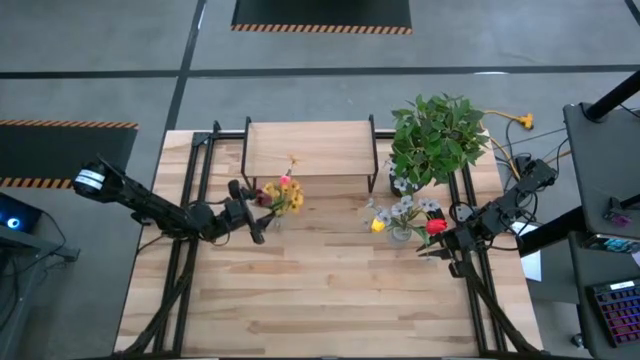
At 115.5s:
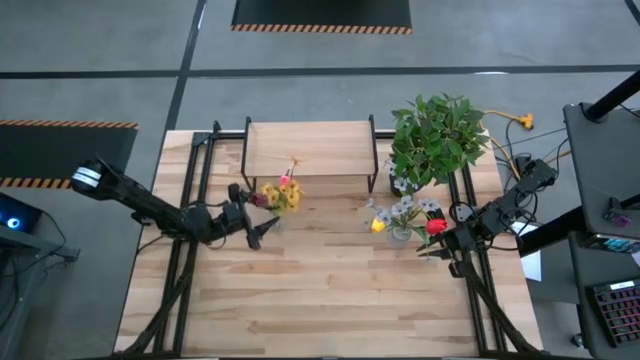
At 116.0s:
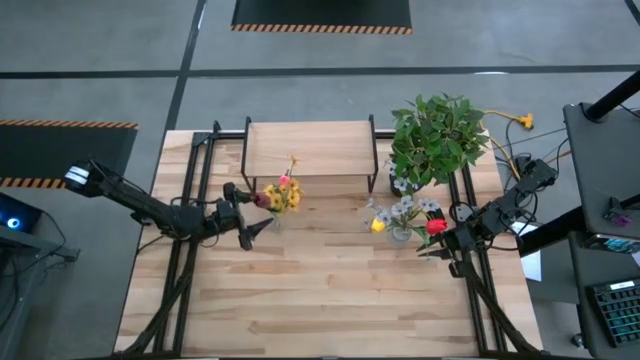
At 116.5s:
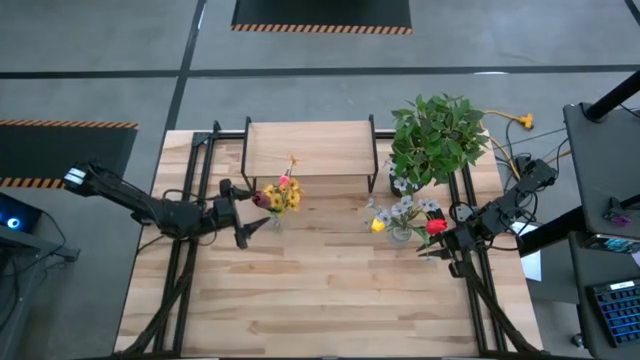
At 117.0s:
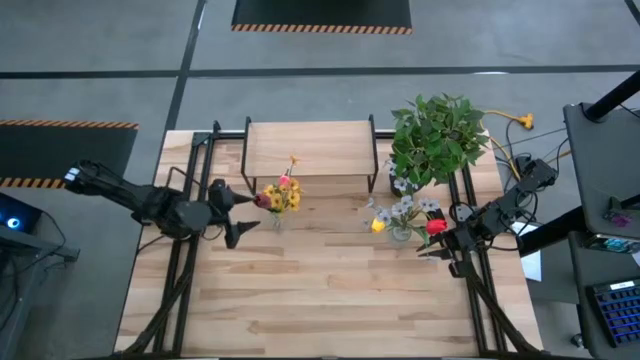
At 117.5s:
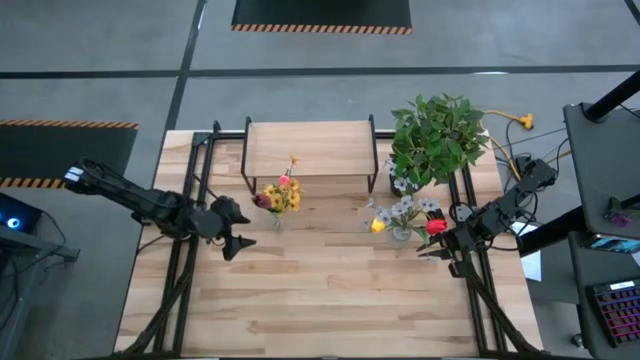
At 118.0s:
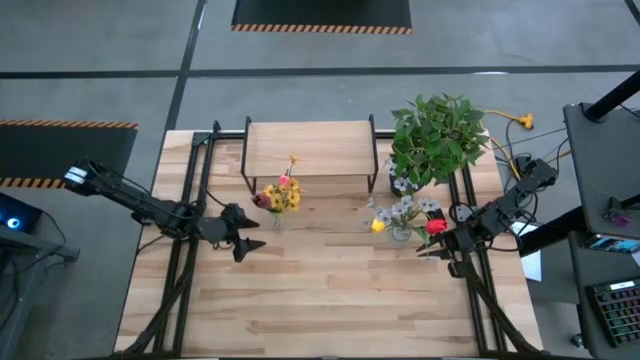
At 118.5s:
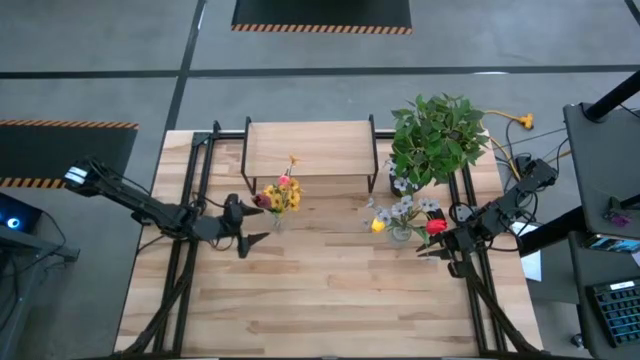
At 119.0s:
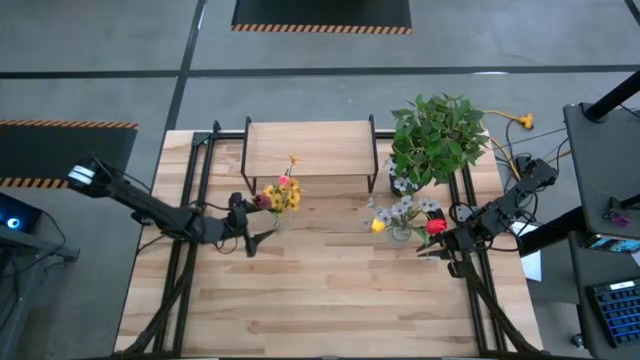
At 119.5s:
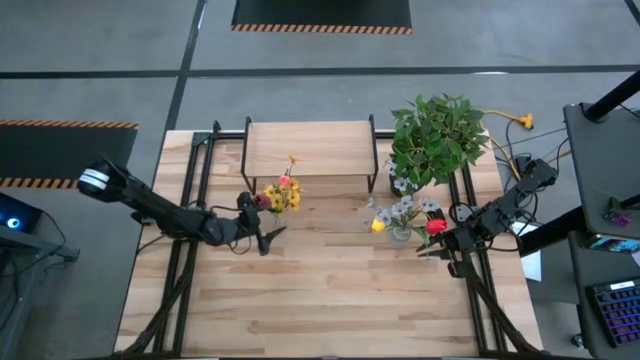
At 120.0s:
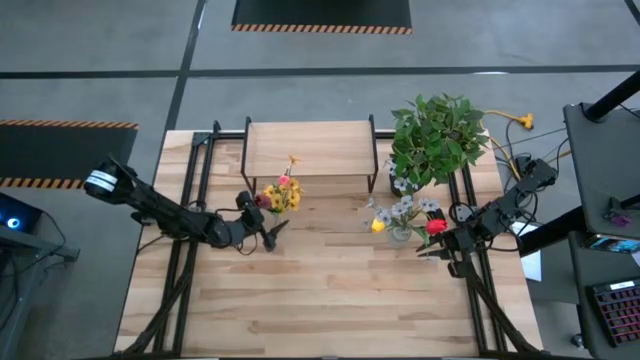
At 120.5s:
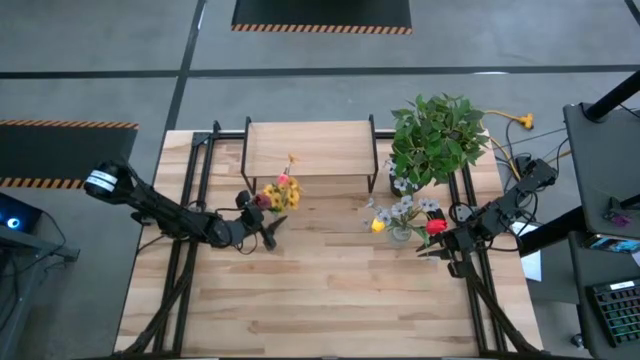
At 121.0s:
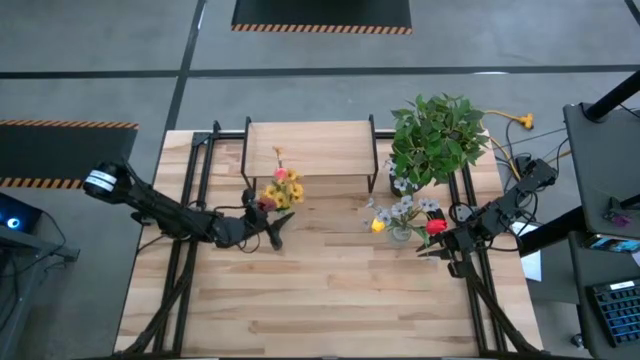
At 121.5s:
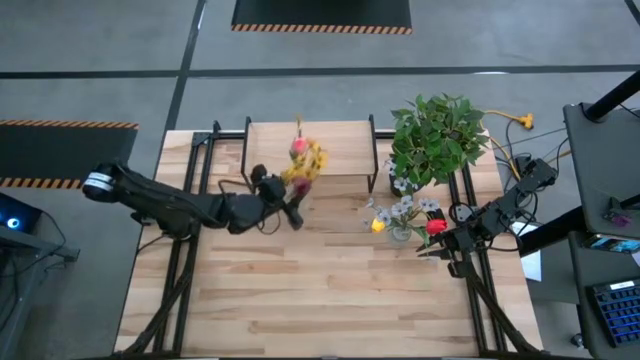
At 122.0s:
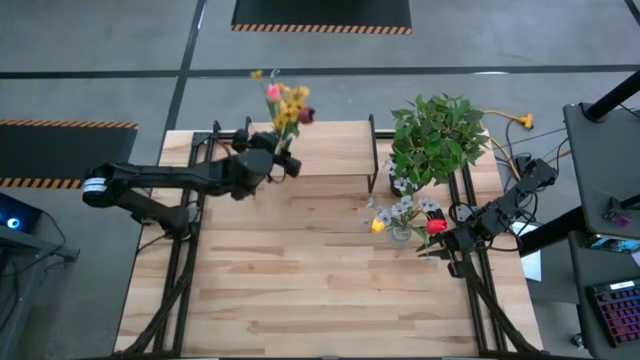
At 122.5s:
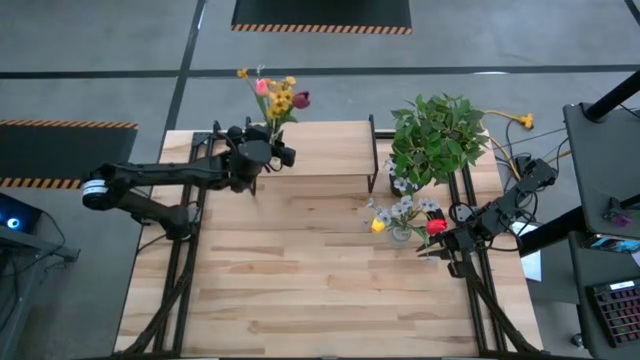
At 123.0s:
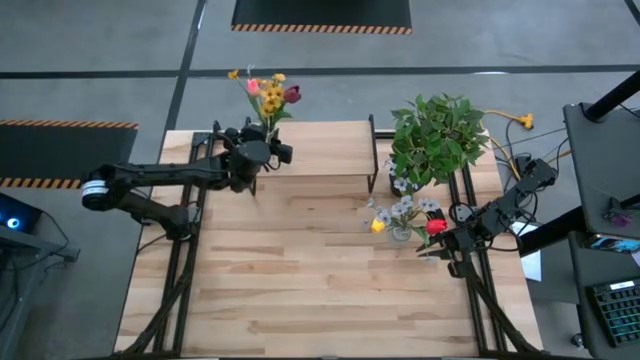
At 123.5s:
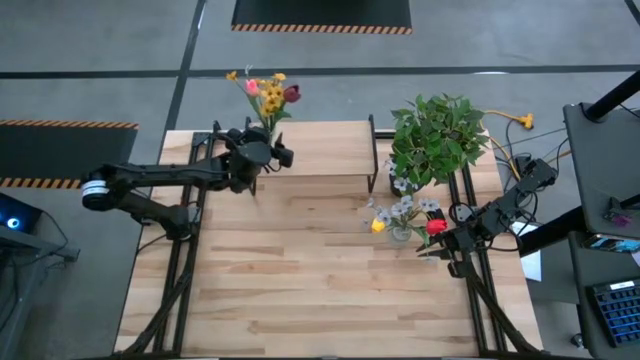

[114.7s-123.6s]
Task: Pick and place flowers into a vace then onto a shelf
Put the left transparent vase with flowers on the shelf

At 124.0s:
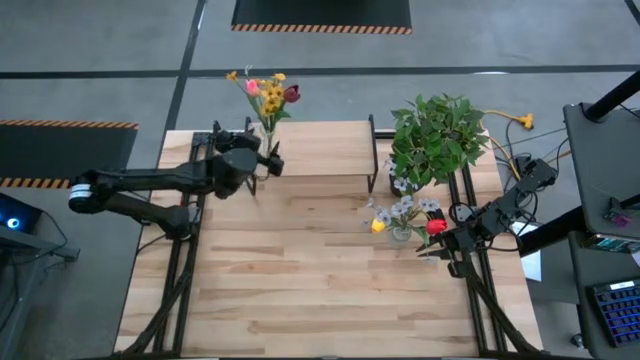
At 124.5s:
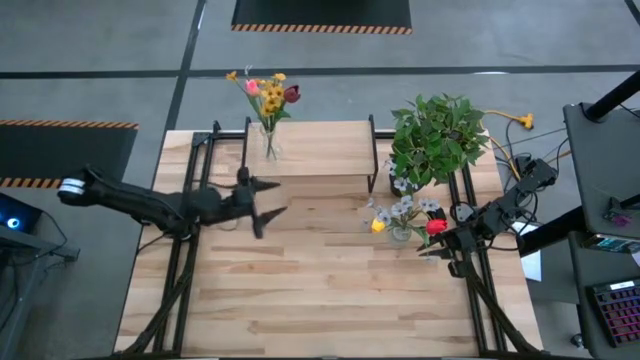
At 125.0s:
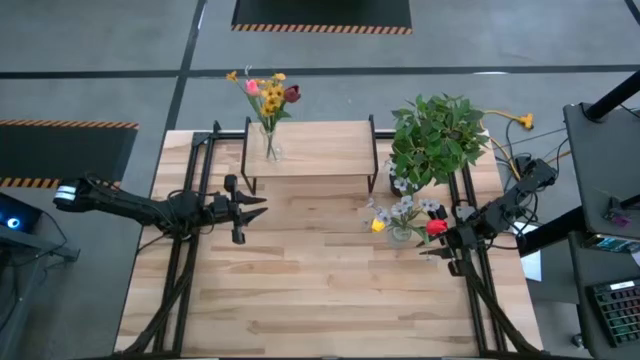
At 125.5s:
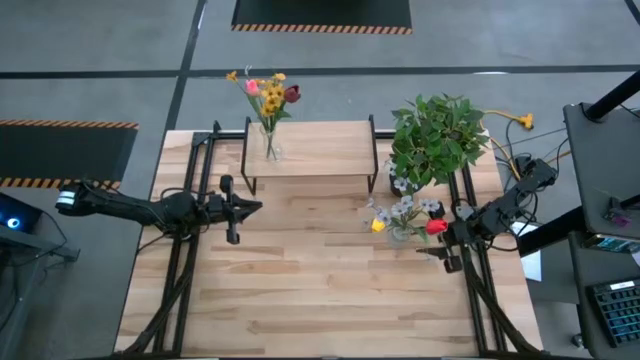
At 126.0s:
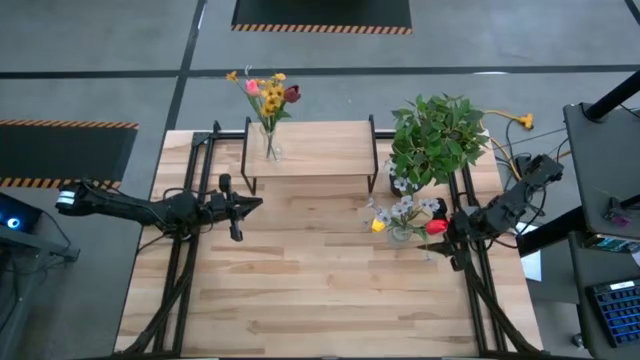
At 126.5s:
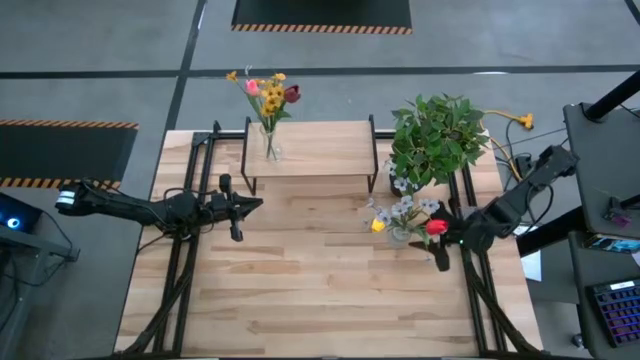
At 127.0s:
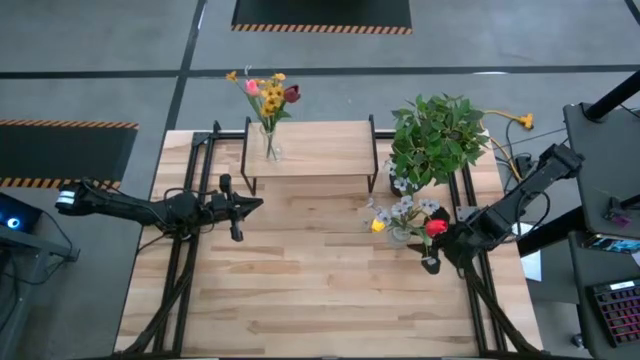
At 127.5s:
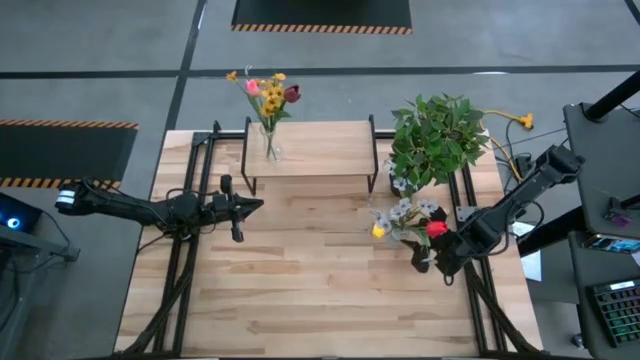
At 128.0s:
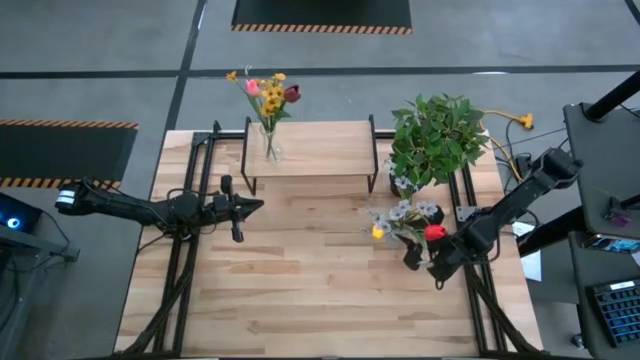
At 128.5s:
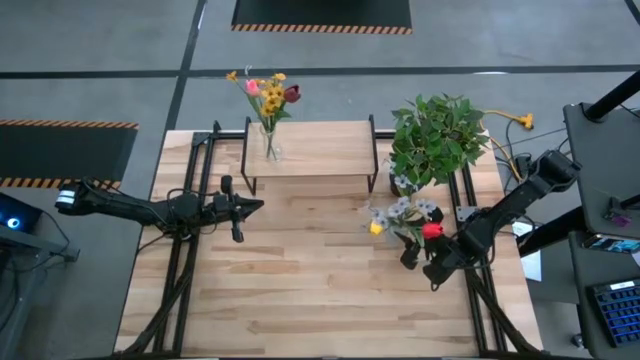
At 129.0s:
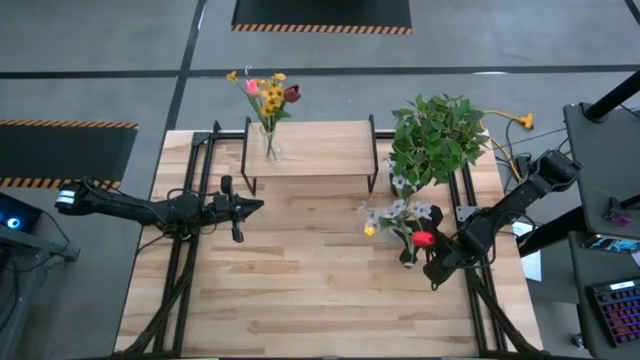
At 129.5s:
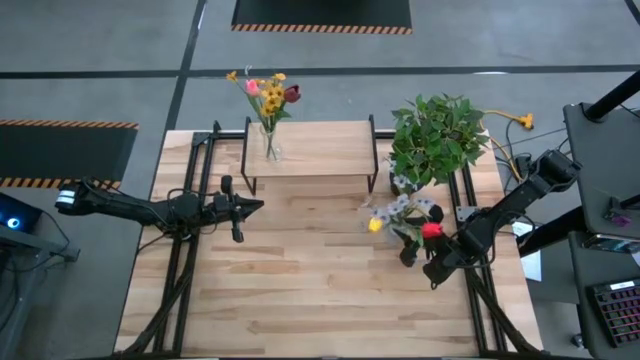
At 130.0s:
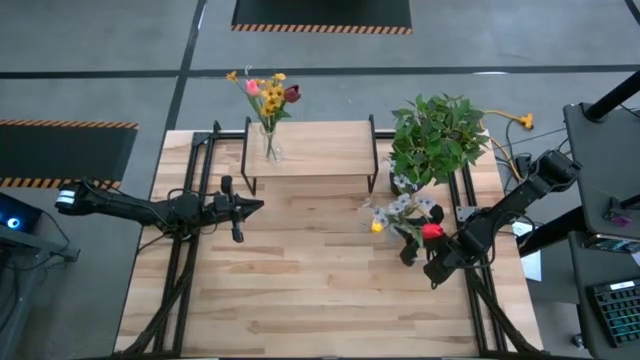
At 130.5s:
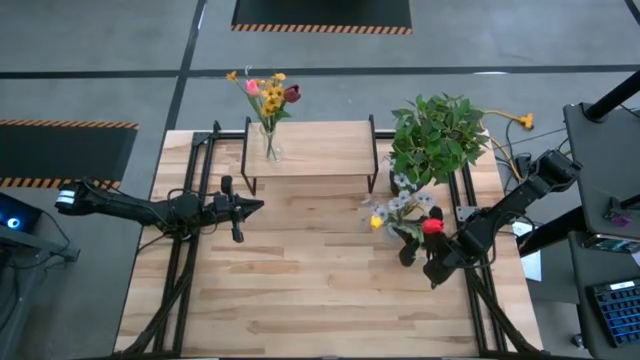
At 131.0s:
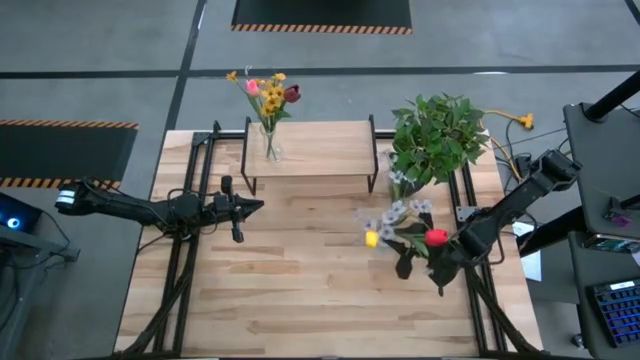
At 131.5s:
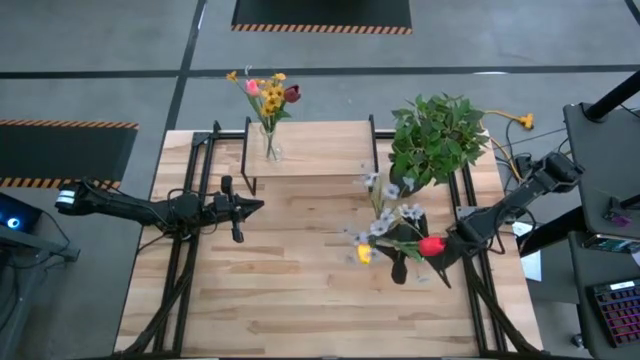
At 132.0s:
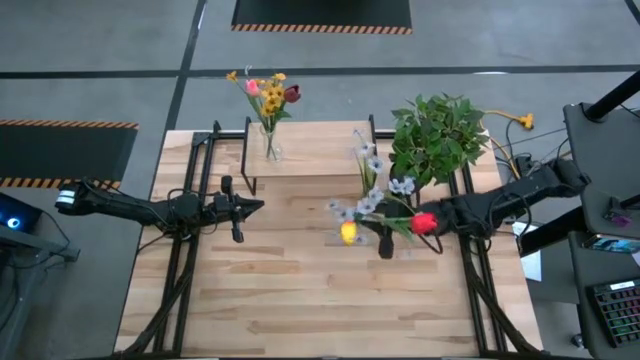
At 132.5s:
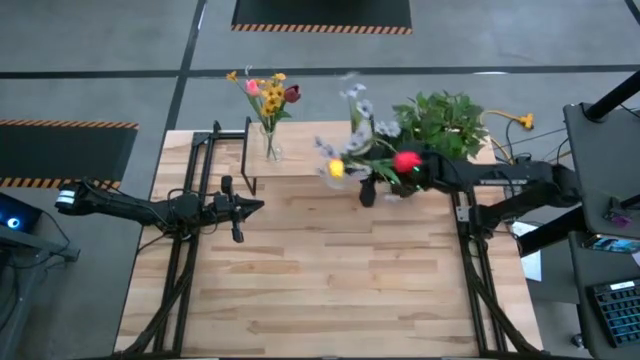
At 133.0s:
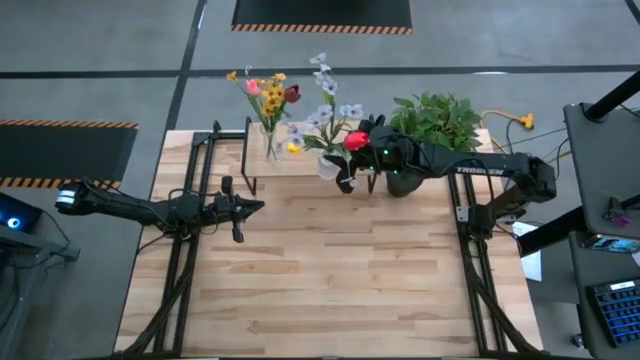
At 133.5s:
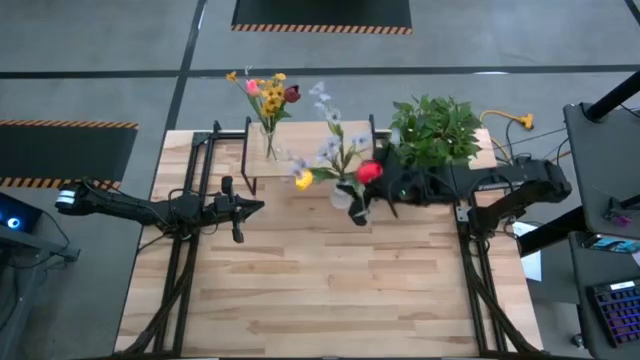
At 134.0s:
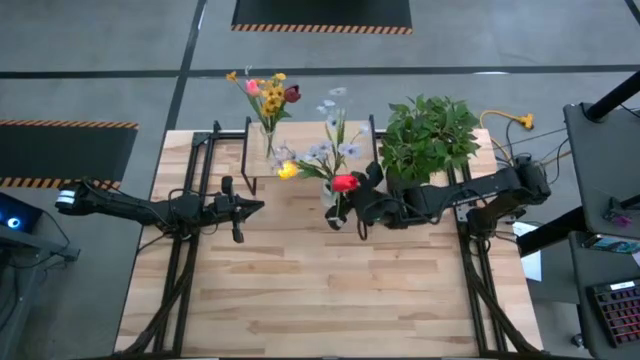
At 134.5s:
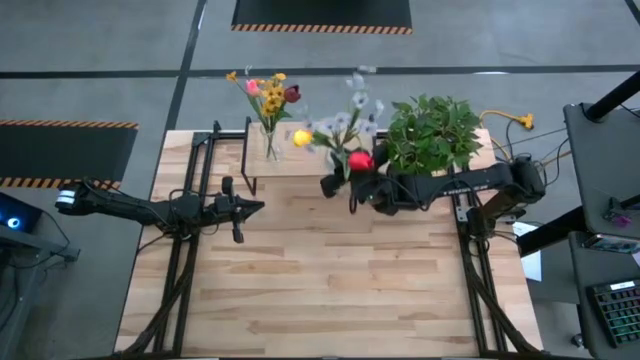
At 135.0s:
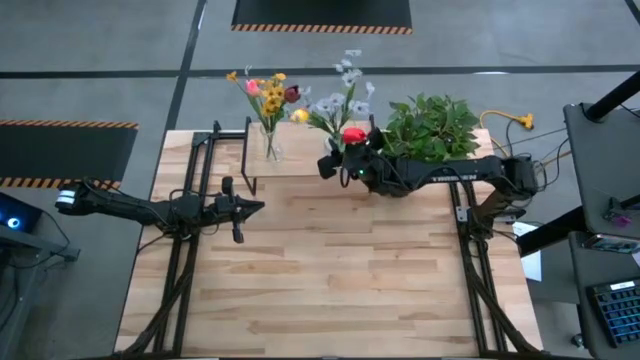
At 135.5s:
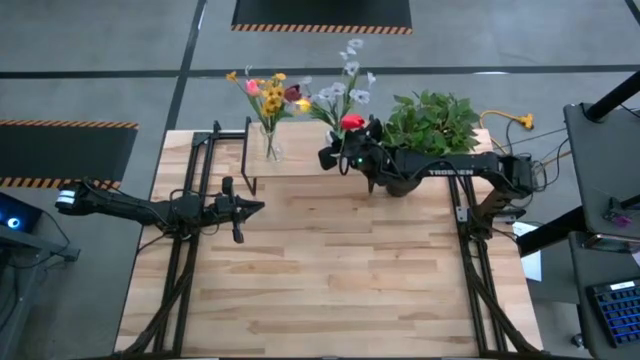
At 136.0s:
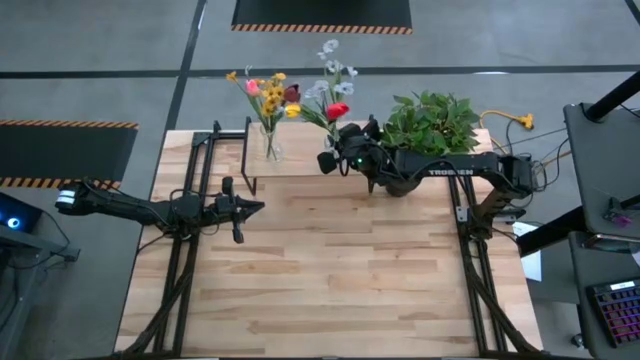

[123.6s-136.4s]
Put the transparent vase with flowers on the shelf
